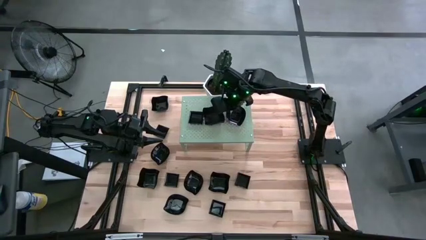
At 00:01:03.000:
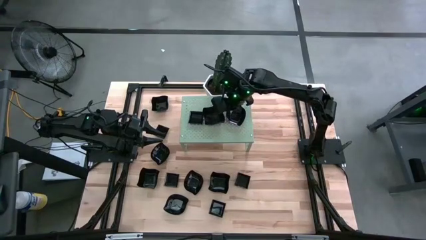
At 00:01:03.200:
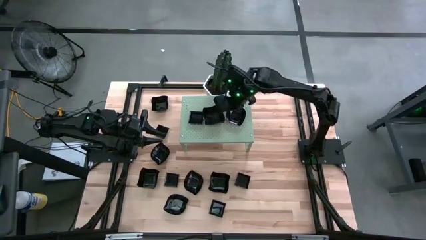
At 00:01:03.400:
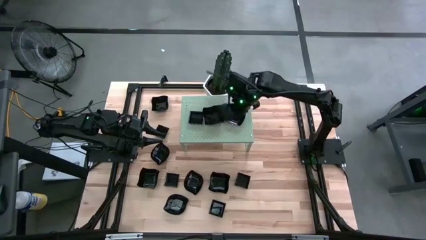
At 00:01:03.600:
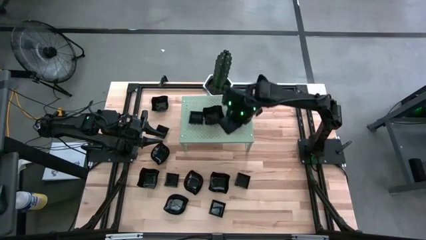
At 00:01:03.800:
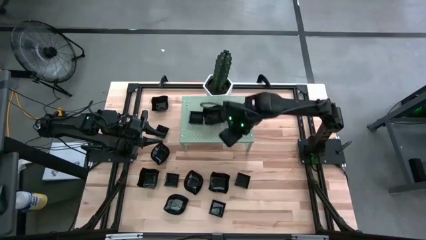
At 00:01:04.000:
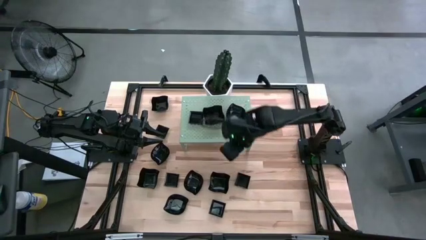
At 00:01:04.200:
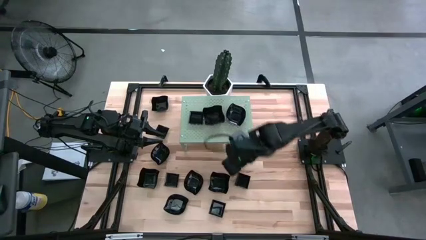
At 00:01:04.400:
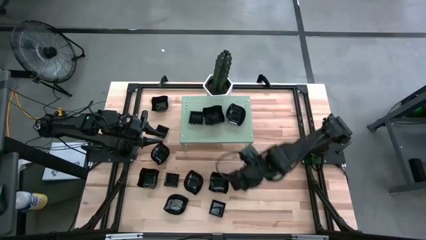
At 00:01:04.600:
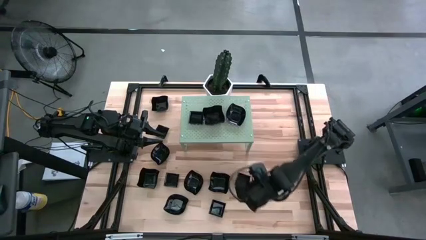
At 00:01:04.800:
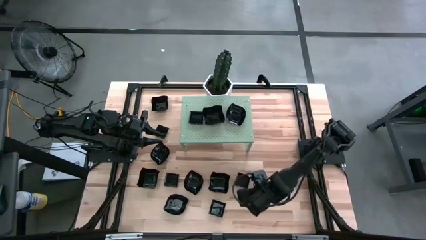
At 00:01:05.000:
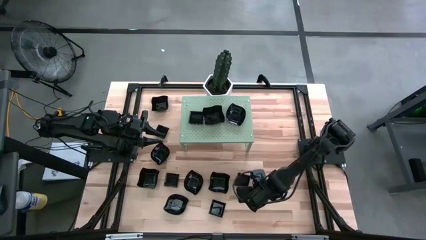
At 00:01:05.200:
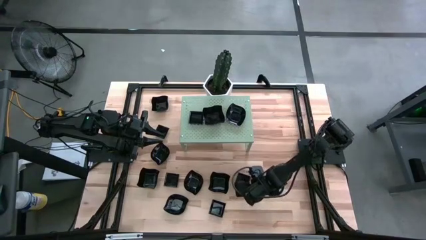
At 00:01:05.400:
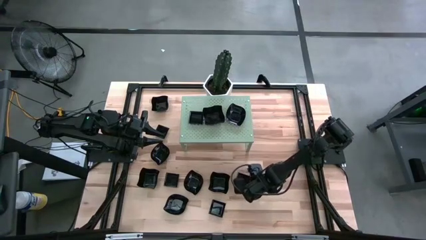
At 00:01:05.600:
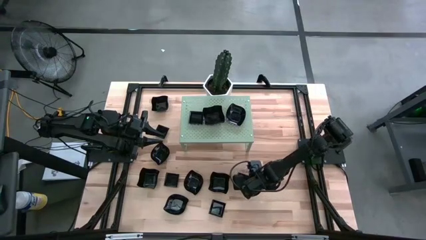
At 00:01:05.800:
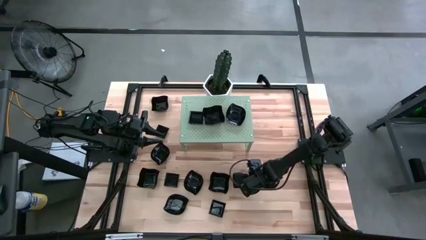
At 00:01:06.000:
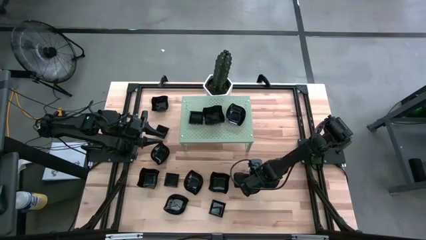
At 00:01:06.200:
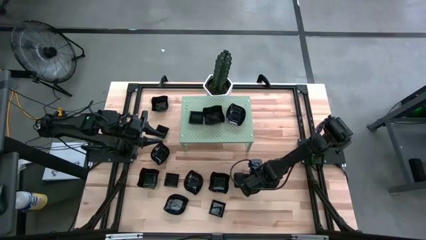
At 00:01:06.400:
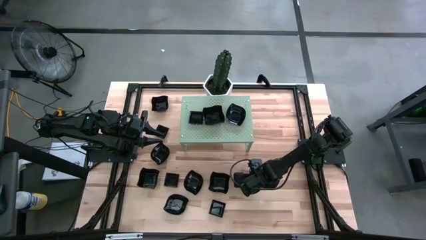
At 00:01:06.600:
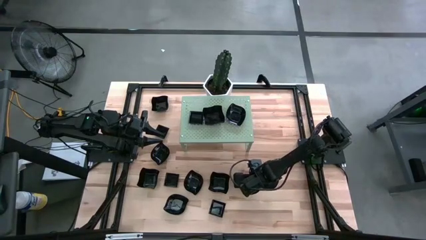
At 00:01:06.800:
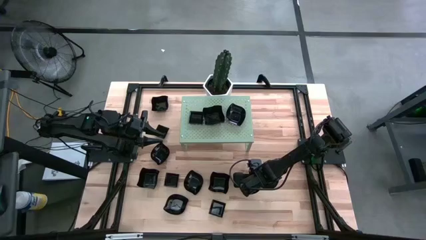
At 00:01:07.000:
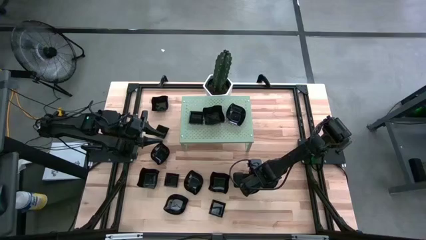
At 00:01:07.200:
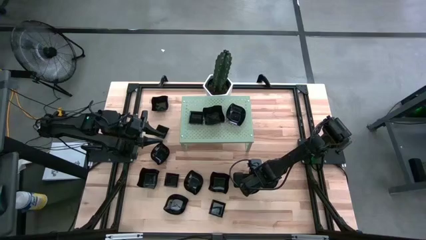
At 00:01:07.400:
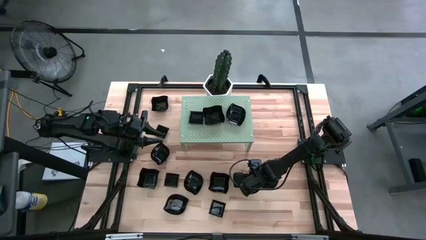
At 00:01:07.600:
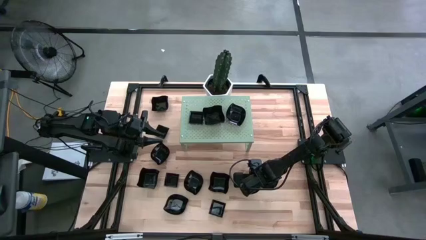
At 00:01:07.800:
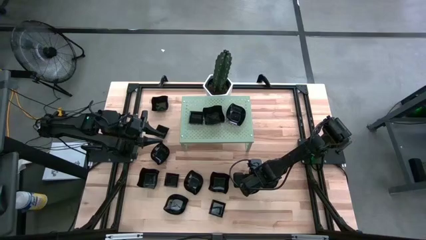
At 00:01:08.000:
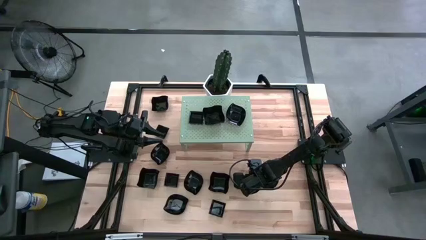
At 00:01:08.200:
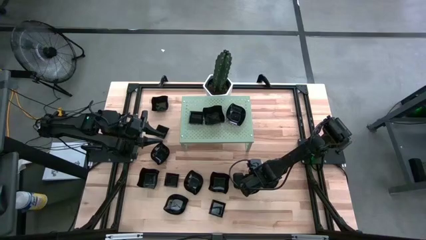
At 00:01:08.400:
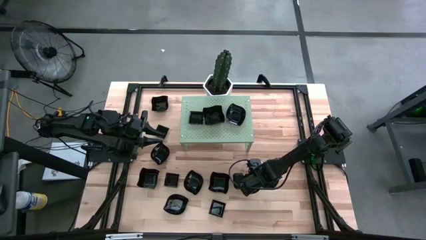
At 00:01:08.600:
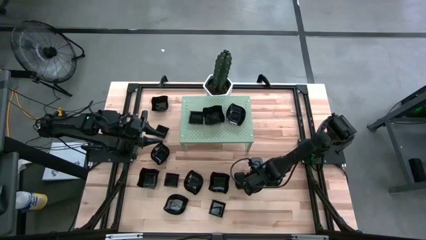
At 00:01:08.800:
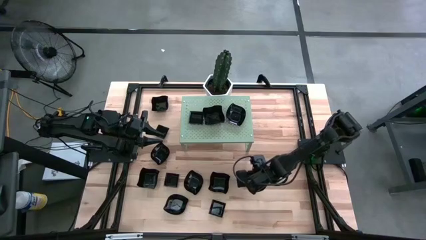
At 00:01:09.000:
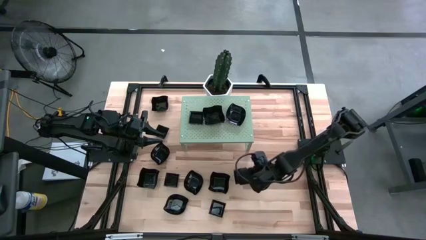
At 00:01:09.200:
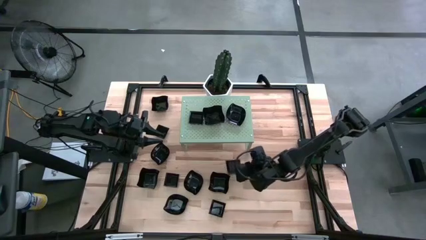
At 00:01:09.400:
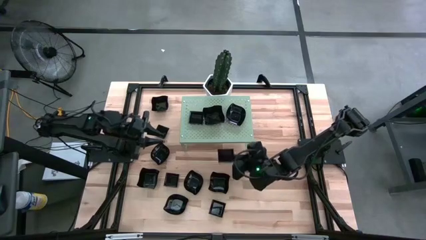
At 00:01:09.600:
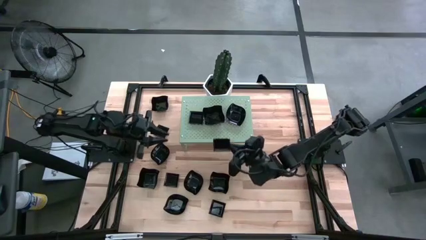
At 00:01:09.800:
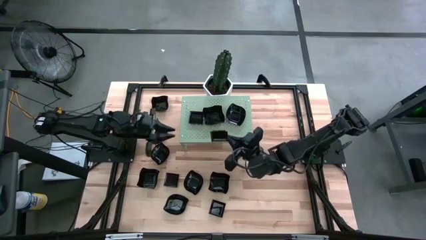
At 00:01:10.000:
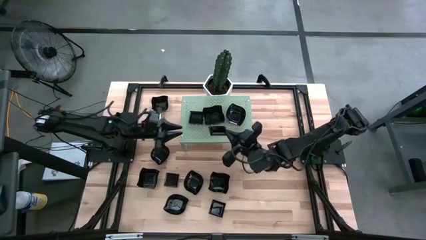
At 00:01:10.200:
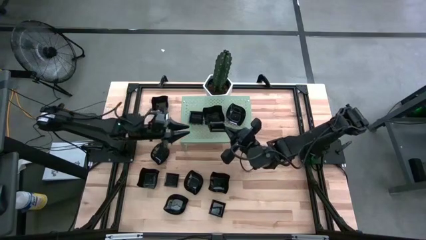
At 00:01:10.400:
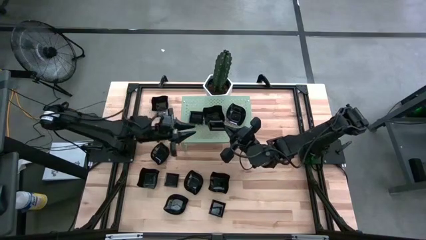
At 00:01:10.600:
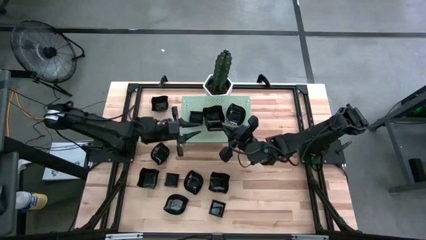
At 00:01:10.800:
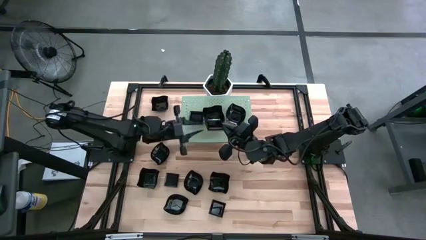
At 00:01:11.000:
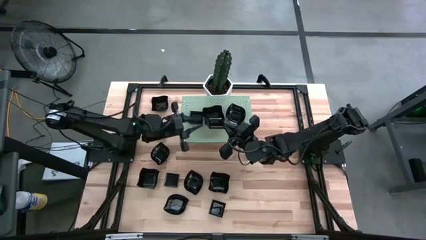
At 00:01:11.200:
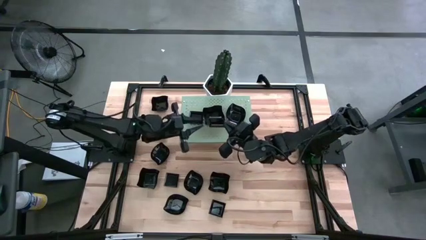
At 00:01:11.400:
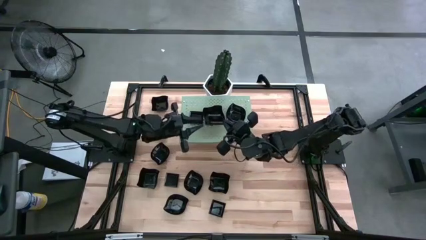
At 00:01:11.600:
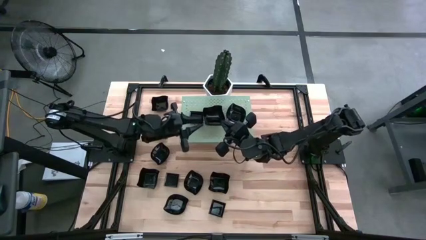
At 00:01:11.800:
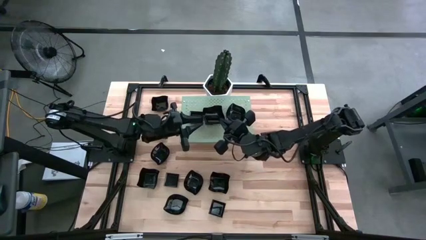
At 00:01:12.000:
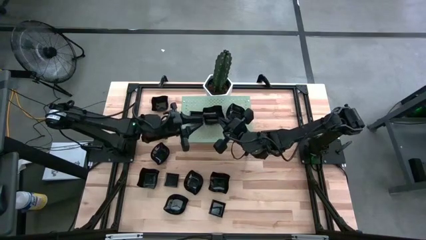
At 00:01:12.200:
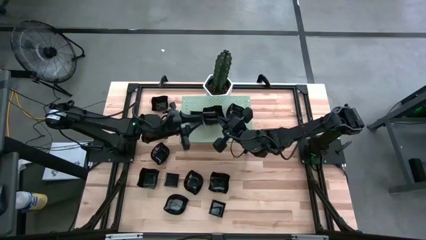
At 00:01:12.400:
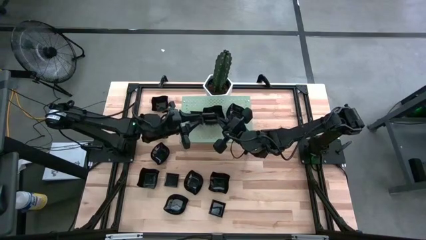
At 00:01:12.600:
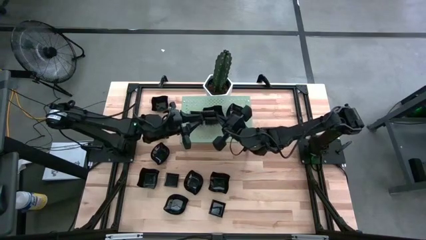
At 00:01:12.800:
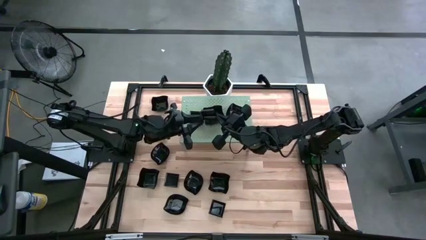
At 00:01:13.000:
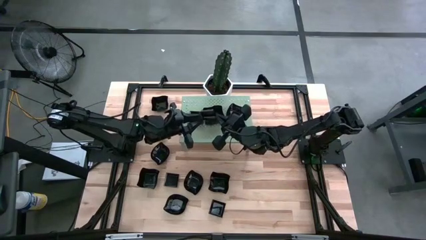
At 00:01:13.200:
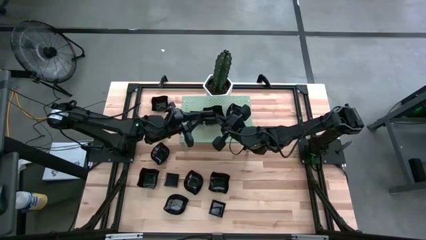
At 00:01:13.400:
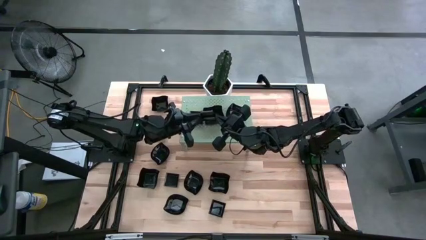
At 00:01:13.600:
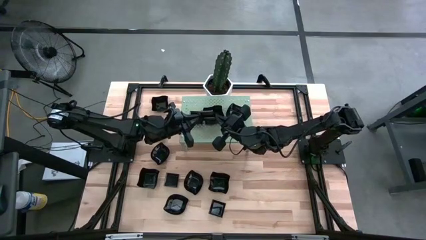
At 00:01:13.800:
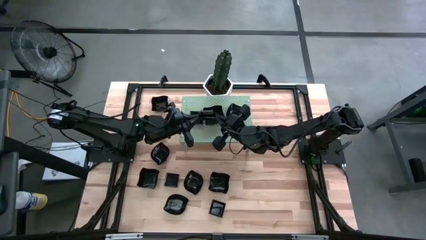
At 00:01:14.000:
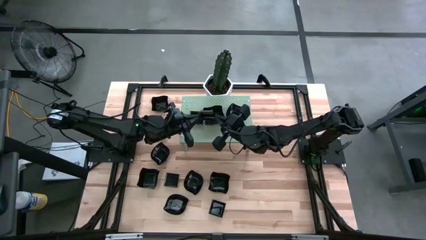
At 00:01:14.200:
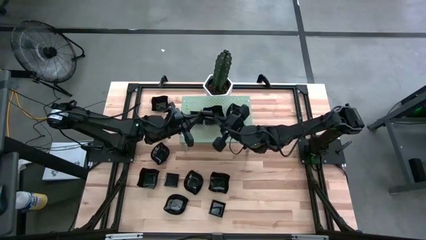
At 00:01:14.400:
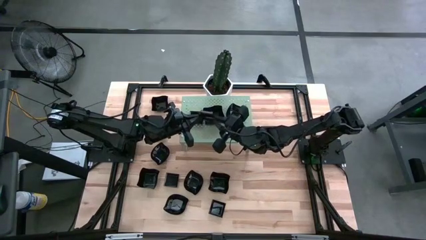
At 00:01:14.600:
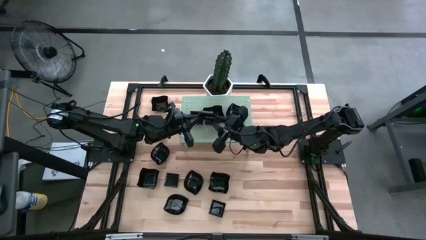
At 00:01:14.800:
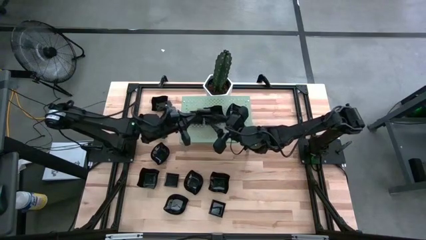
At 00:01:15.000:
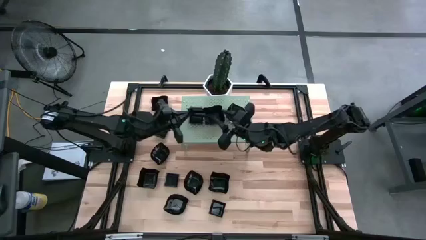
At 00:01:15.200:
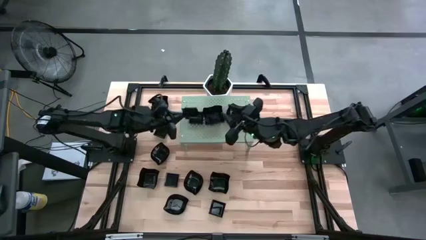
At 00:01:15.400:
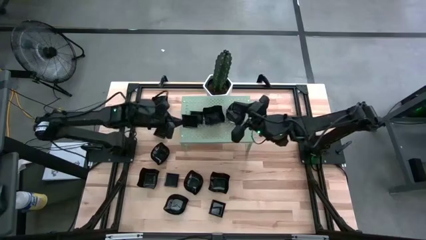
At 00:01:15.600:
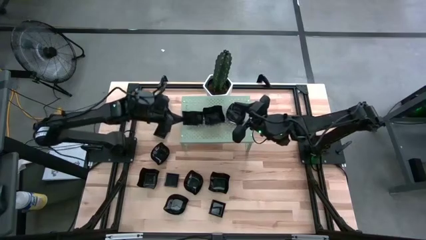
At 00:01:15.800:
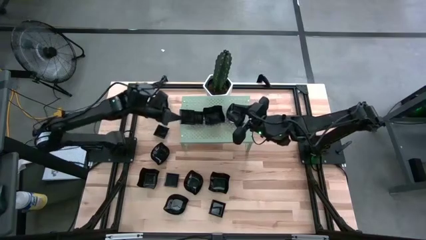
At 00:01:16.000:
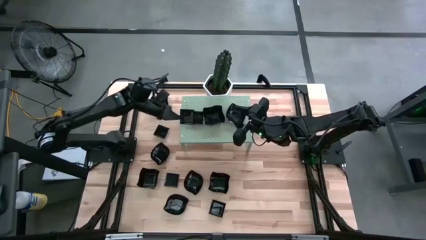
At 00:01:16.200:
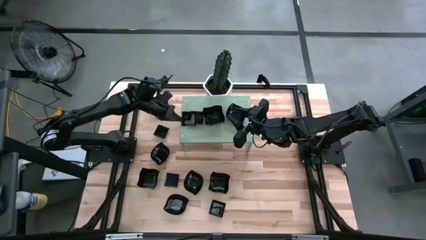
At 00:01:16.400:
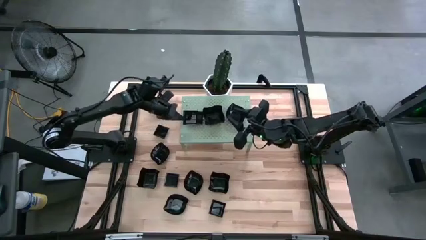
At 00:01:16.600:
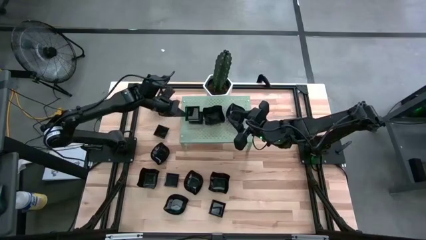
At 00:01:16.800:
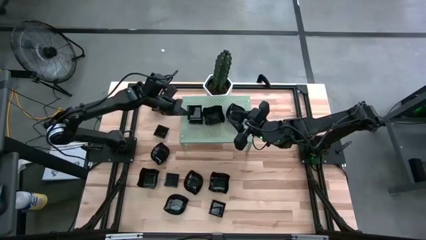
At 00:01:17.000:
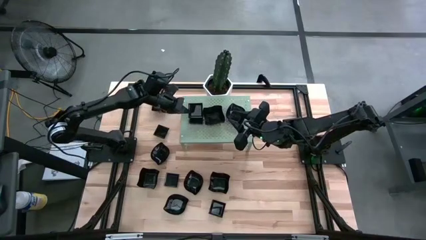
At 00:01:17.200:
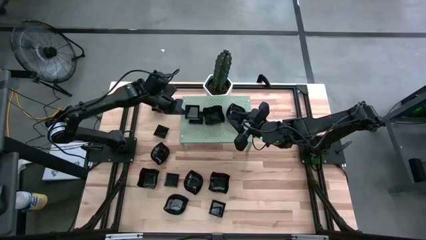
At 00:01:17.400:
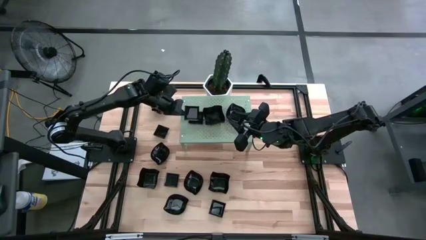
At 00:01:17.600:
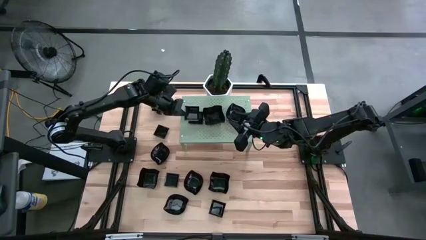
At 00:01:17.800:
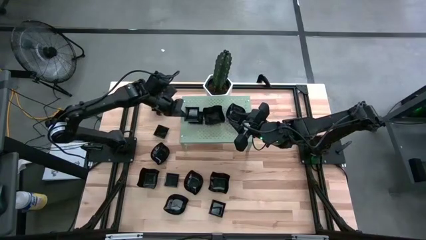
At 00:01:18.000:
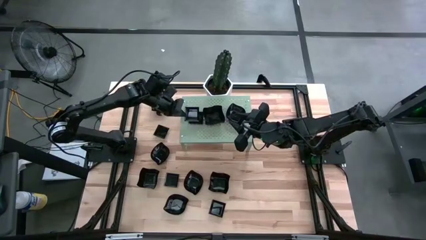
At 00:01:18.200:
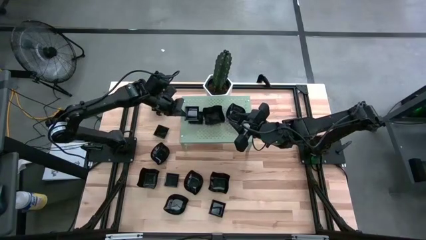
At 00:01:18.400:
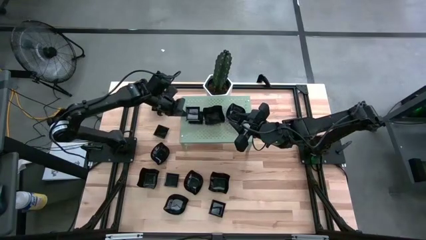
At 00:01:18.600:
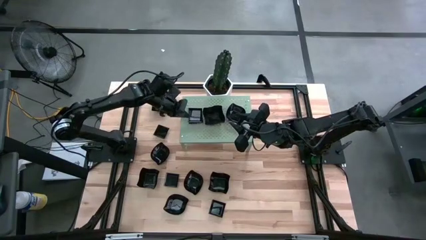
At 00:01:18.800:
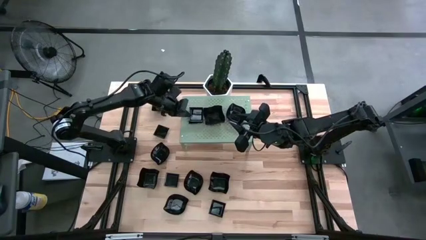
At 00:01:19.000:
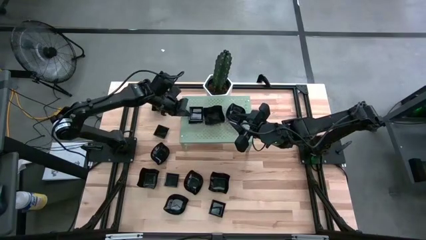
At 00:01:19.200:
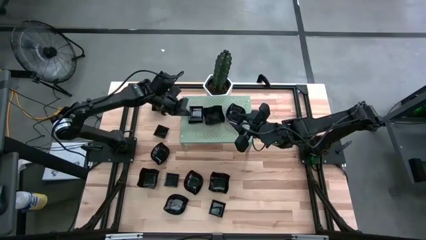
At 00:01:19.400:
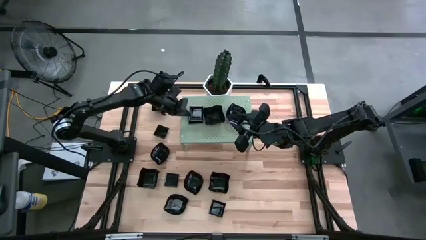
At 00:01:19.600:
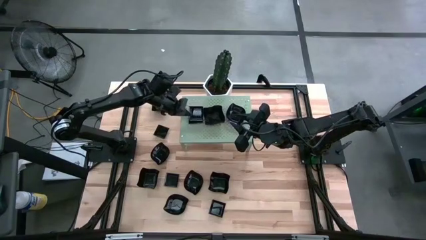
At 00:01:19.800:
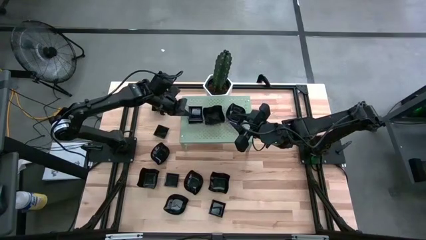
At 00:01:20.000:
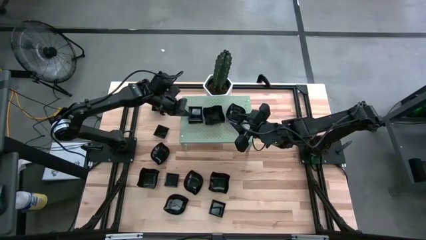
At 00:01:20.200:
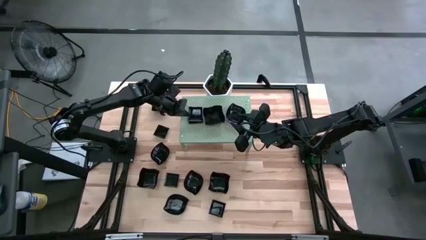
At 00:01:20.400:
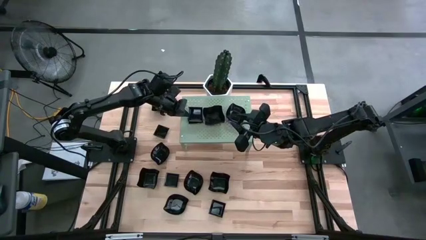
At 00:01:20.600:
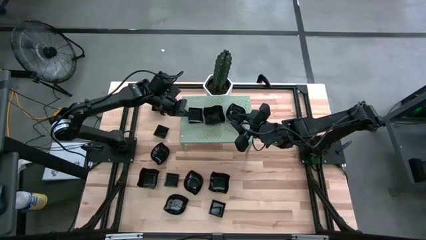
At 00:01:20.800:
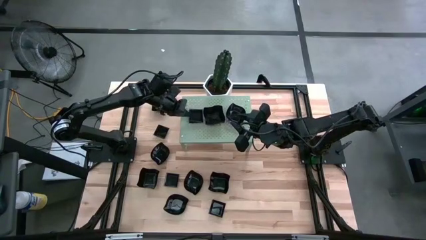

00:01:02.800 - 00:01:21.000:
Task: Pick & Place Mini shaped plates
Stack the square plate on top of the square plate on the shelf
